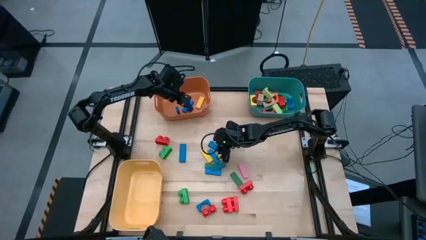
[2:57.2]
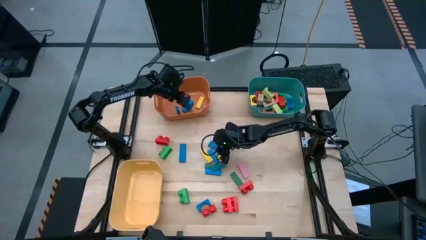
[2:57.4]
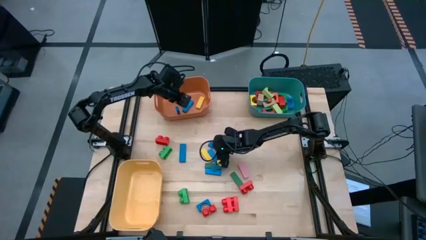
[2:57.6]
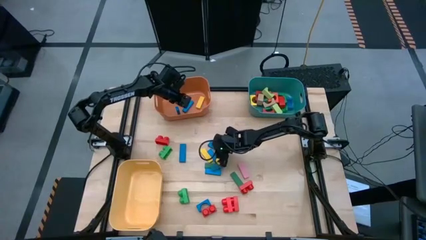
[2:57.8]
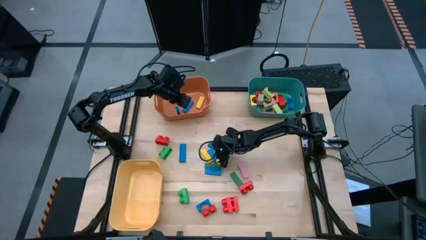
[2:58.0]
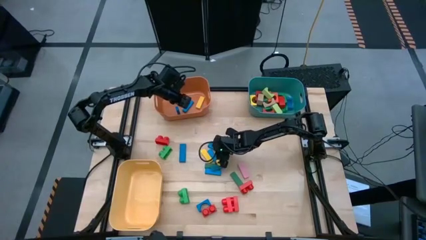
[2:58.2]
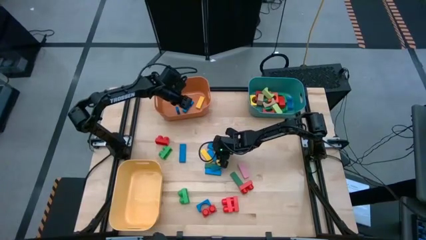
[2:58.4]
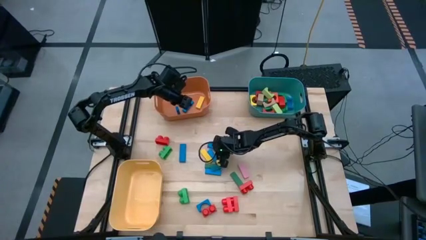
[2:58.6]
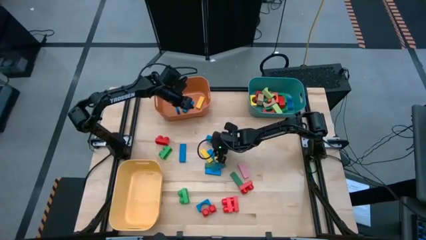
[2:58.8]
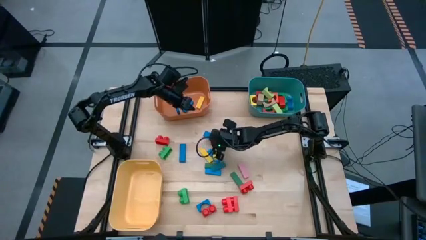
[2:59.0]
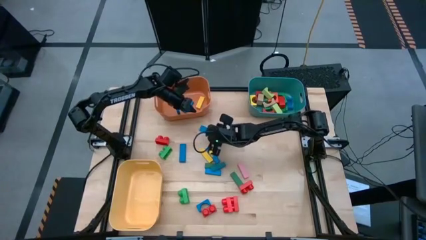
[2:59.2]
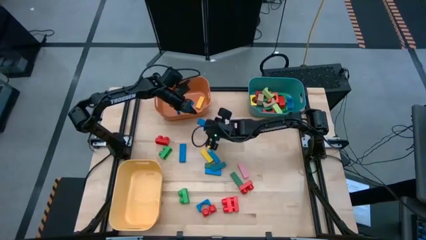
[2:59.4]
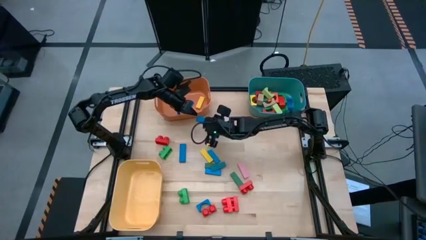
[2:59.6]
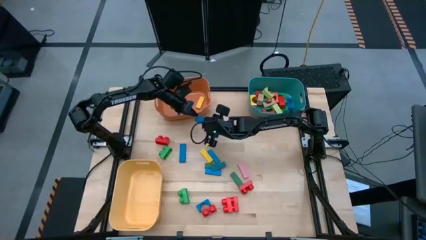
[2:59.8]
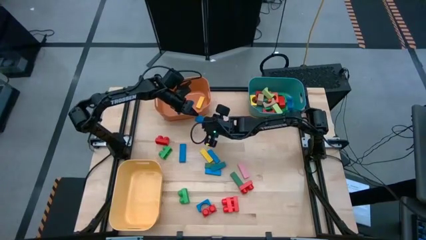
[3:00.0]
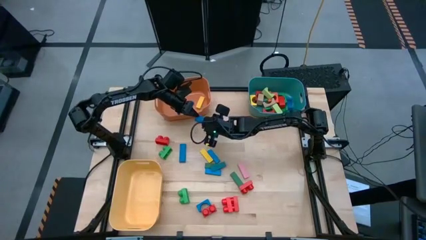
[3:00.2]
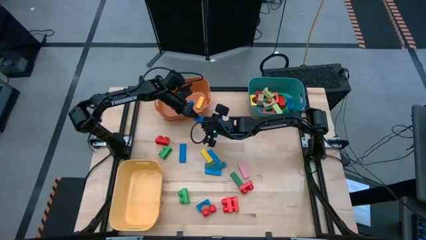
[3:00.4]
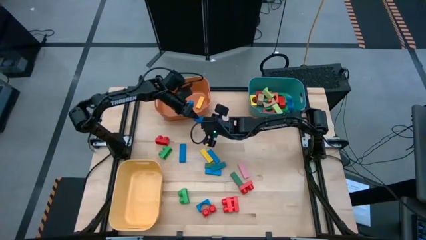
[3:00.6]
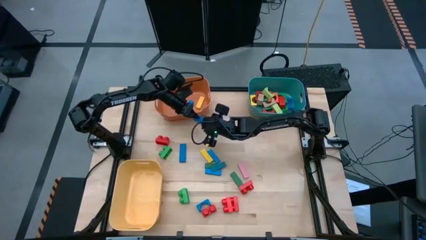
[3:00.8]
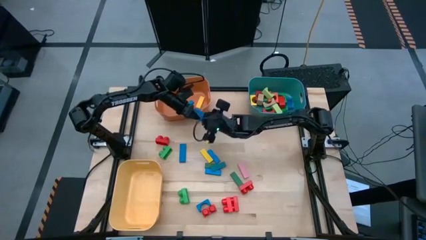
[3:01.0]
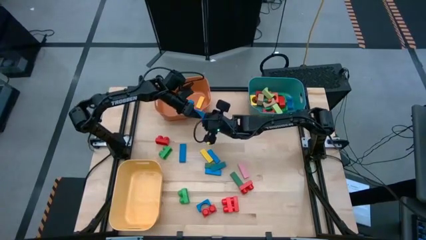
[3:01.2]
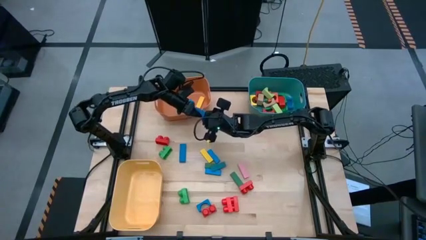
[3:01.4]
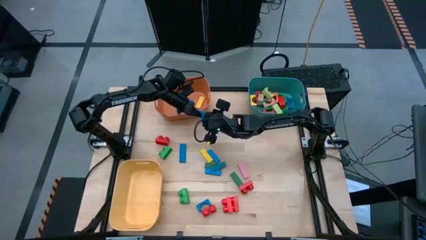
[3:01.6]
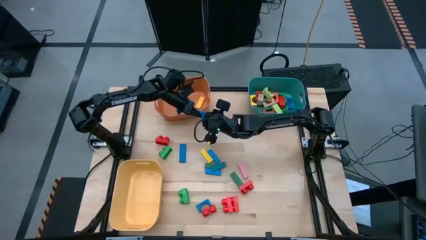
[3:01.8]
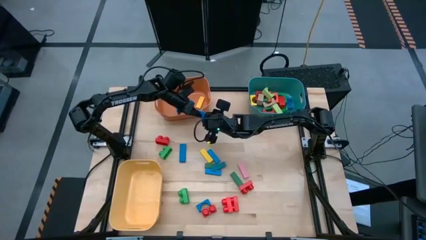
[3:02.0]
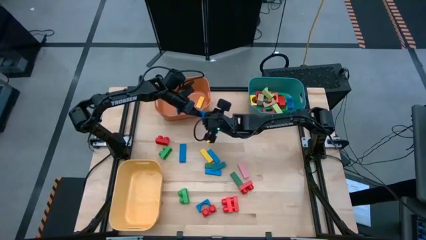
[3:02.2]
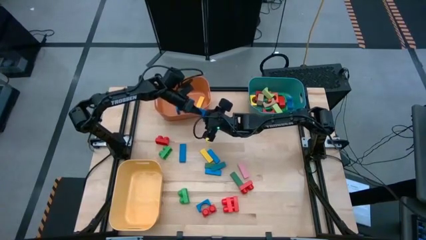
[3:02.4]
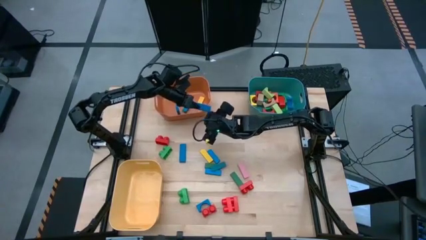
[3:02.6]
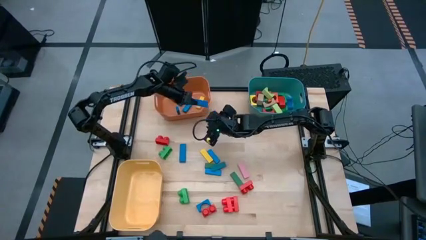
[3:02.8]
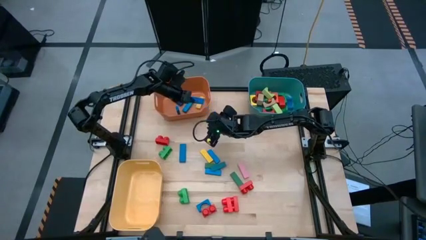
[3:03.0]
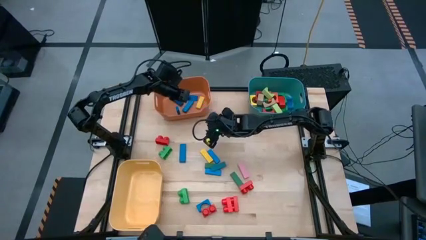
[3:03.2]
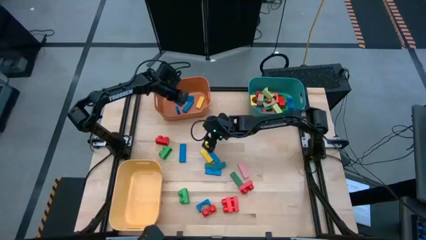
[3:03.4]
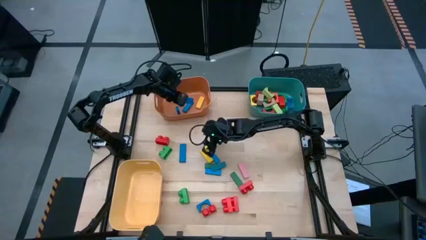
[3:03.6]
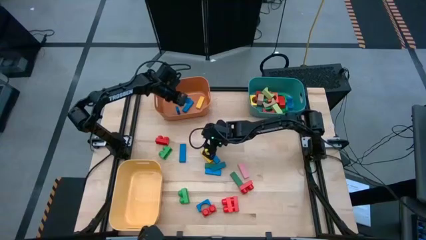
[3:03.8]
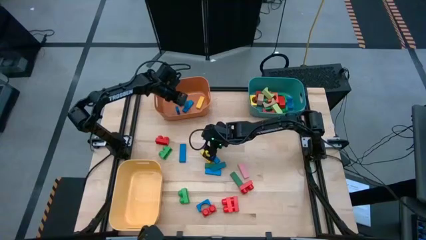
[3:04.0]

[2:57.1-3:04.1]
Task: Sort blocks by size
Put the blue rectangular block into the orange bin

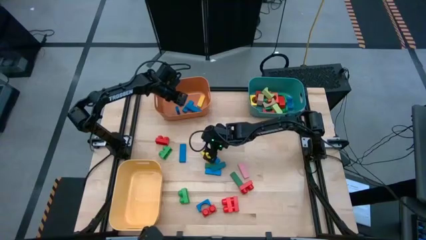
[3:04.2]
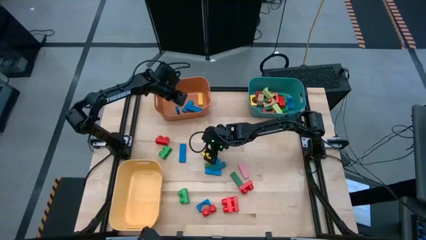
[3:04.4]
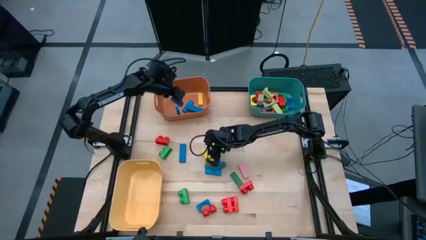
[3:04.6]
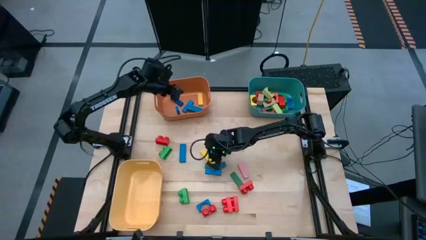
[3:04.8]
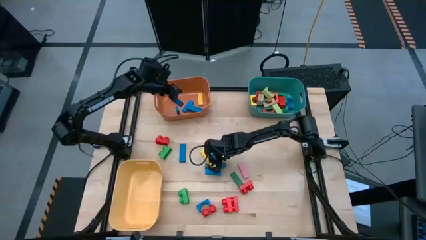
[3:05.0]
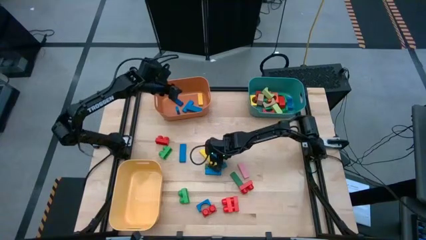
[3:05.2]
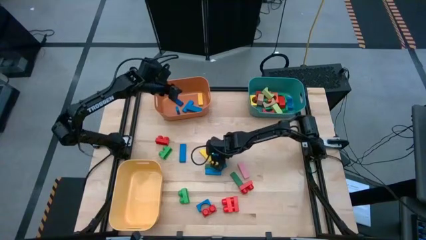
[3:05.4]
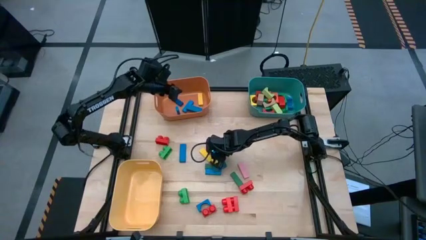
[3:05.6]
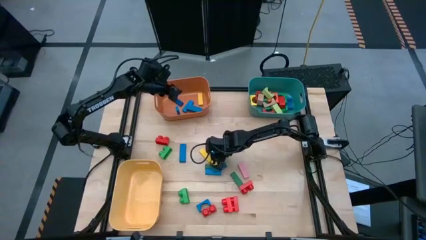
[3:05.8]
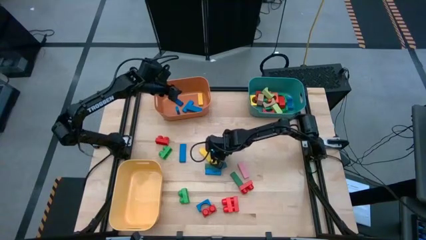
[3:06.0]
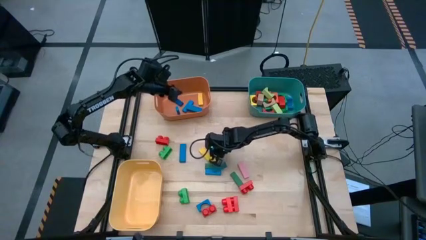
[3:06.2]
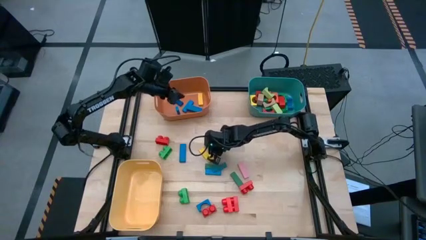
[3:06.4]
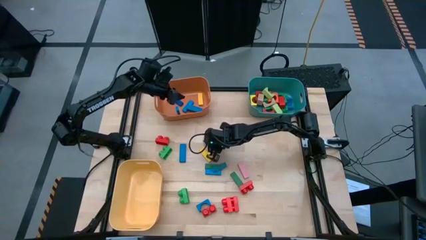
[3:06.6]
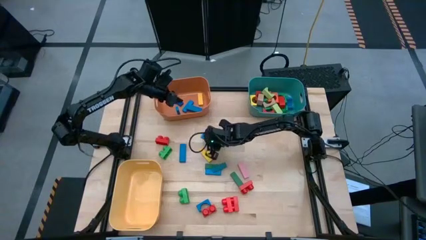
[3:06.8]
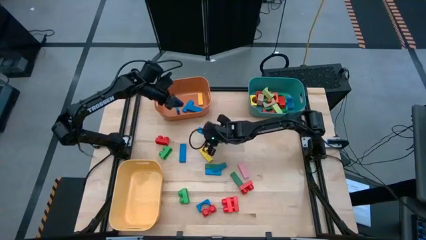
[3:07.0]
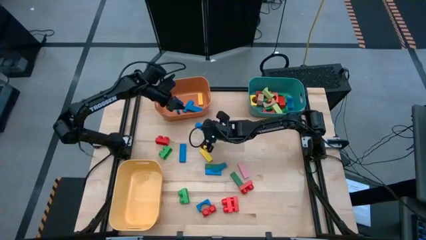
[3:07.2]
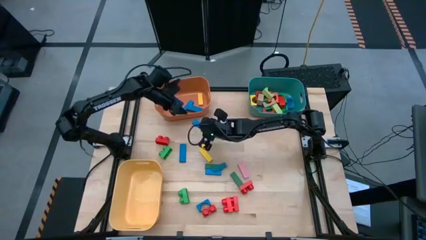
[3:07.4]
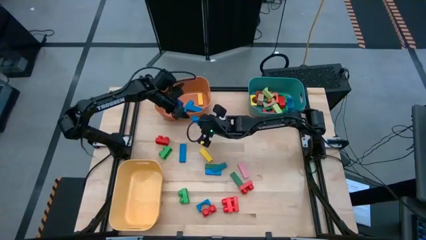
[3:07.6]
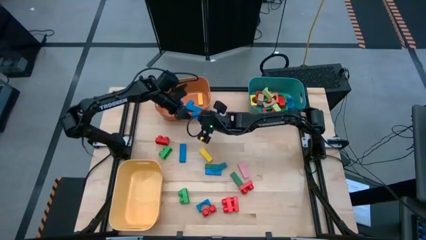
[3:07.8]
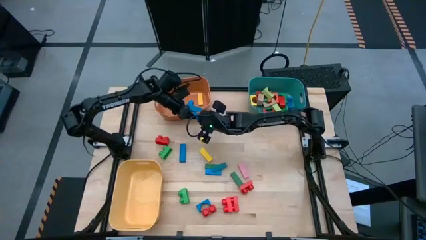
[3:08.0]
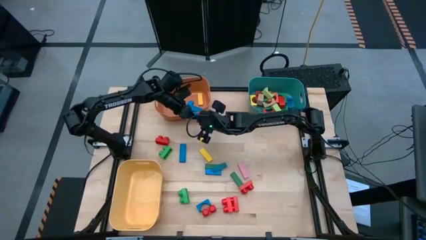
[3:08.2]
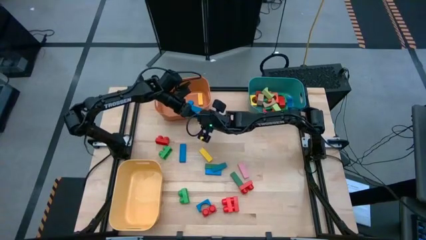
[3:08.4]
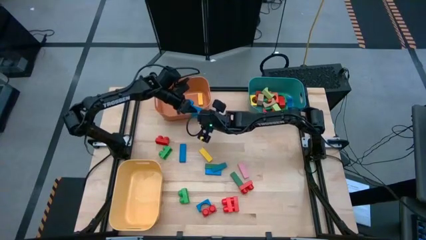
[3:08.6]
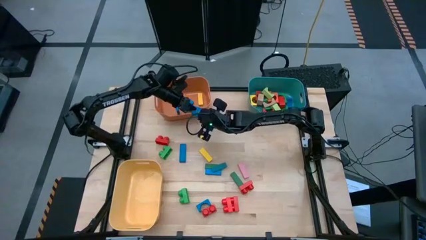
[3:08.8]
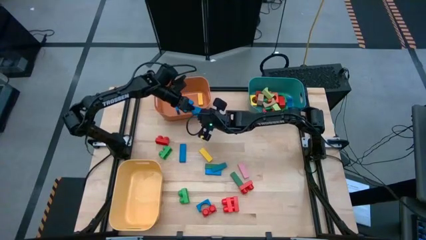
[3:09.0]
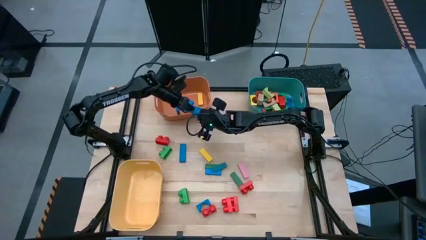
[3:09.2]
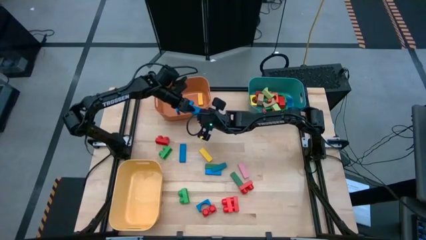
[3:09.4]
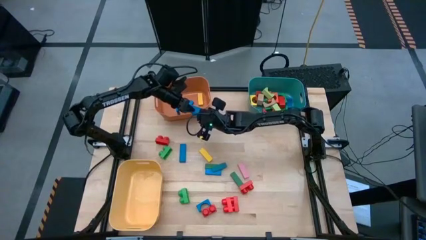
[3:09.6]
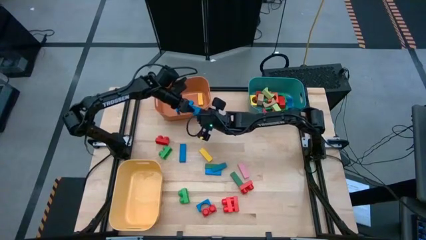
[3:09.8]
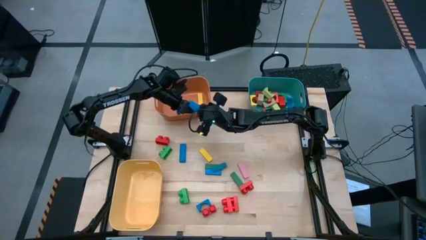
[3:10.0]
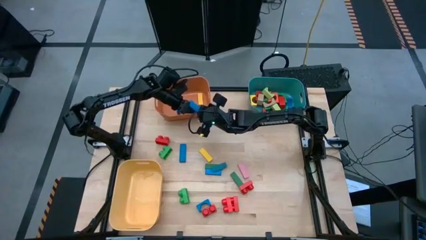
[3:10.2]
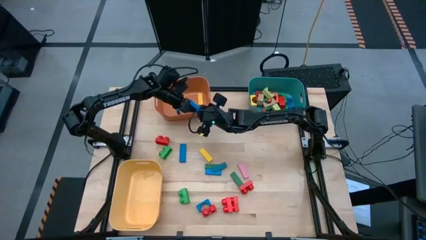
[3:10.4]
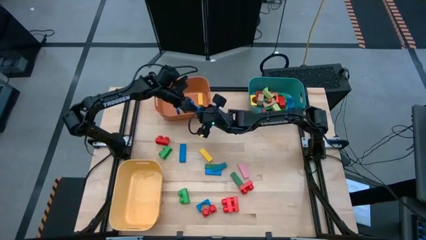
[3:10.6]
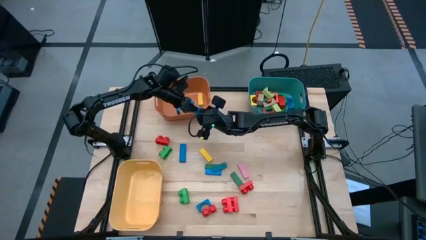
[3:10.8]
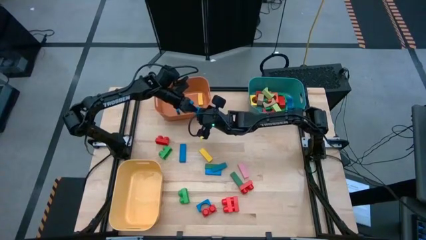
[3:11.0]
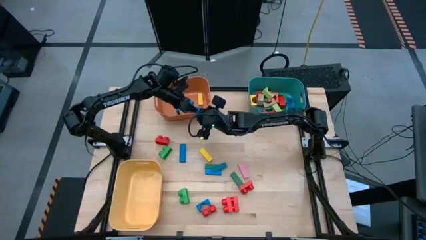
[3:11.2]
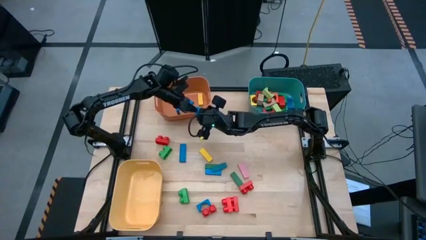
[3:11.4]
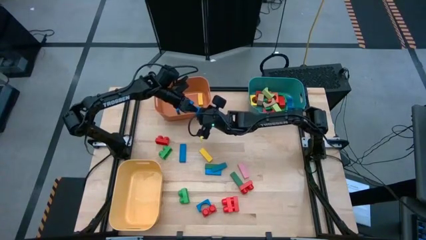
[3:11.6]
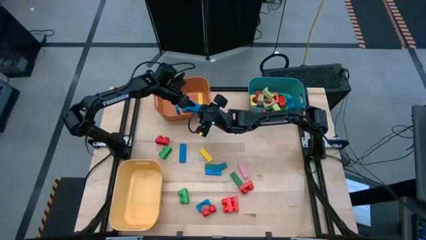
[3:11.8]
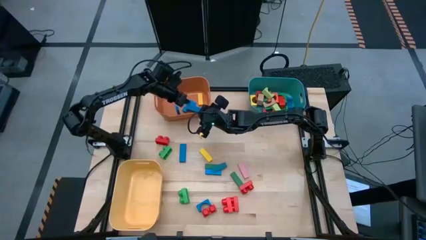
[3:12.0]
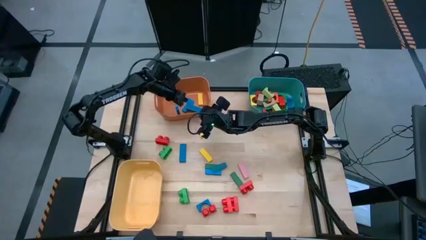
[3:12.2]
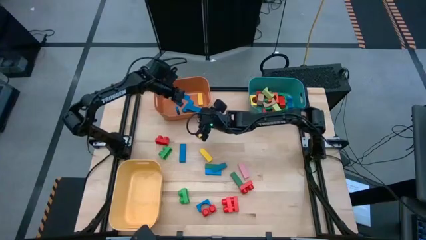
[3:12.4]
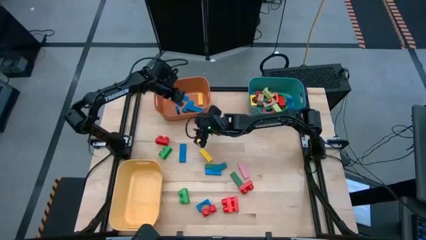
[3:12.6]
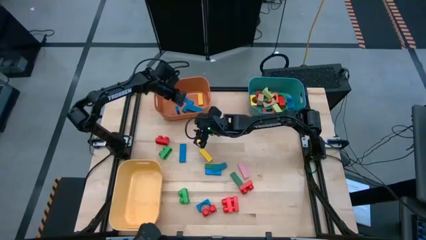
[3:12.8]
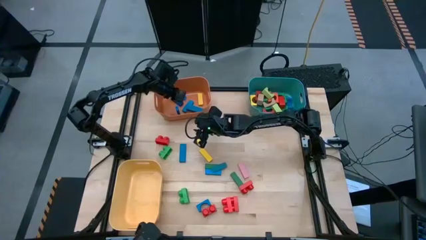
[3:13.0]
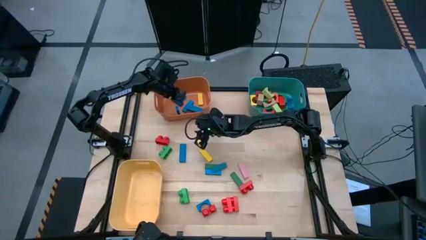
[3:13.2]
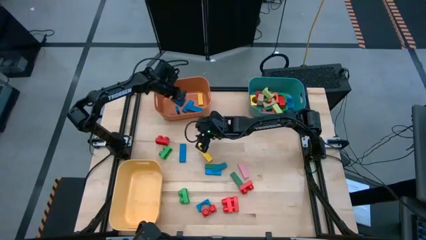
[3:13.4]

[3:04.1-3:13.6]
Put the blue rectangular block into the orange bin

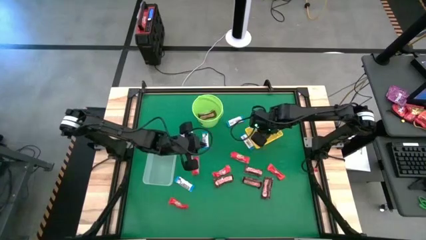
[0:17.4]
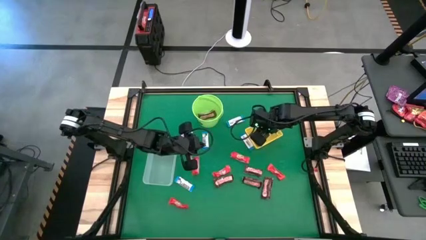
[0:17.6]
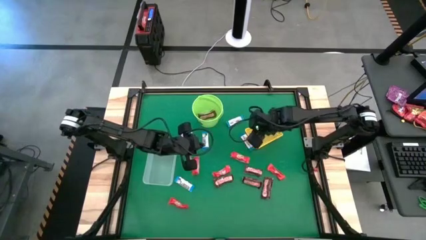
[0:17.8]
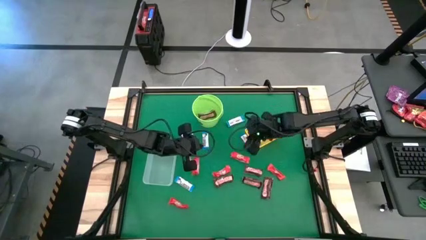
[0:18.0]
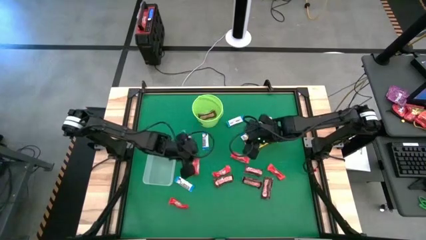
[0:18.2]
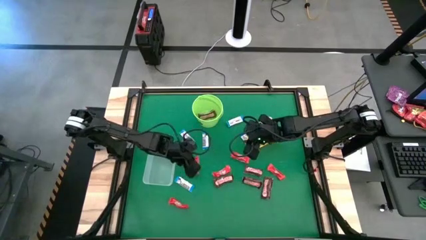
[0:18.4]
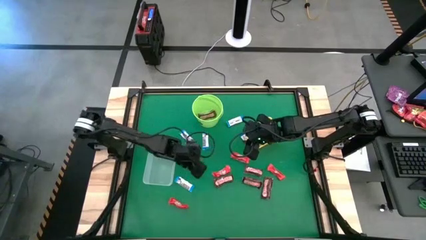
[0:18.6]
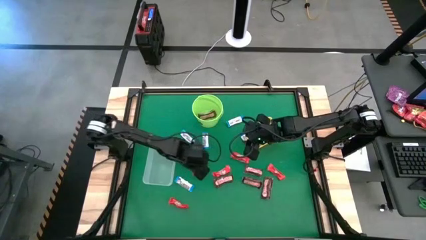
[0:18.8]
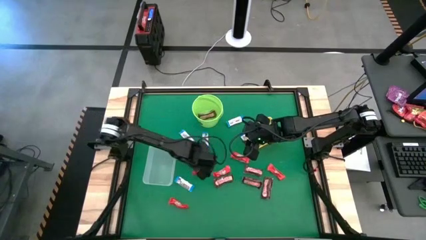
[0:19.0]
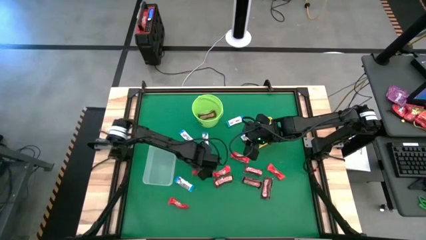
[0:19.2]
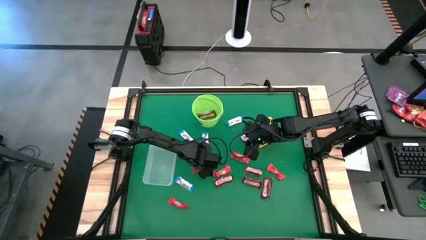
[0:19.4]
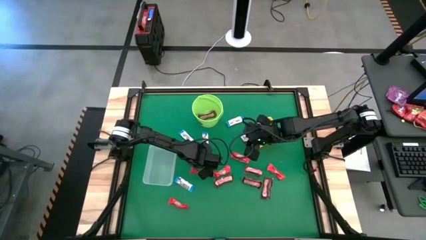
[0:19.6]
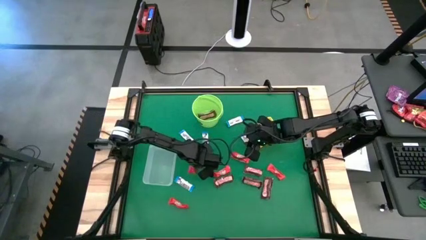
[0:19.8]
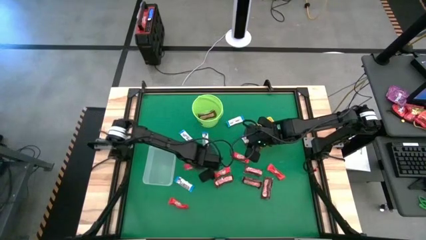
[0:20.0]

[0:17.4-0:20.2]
Task: Sort candy by brand, put in halloween buckets
Put the red chocolate bar into the transparent bin
